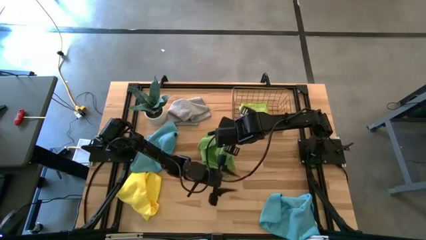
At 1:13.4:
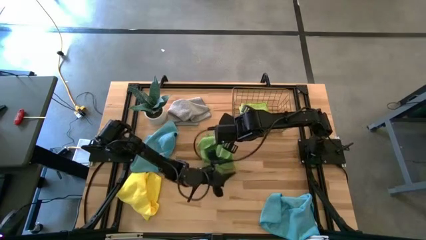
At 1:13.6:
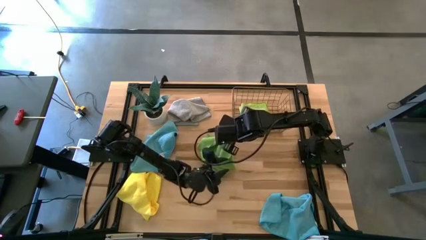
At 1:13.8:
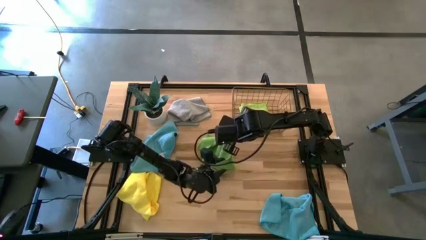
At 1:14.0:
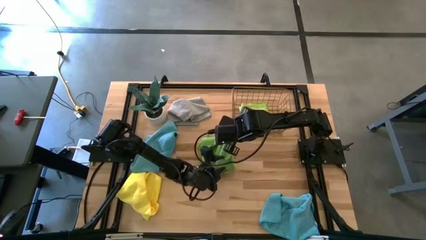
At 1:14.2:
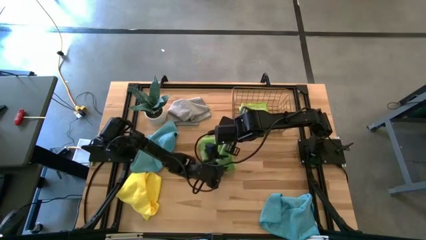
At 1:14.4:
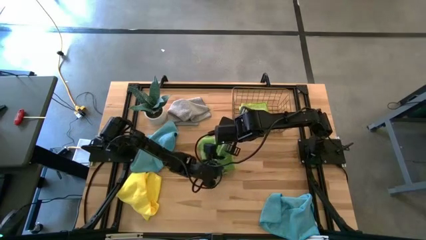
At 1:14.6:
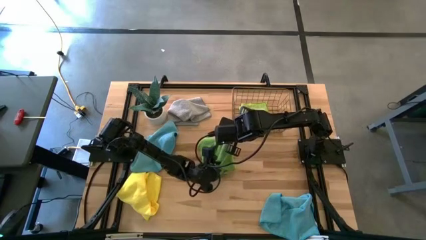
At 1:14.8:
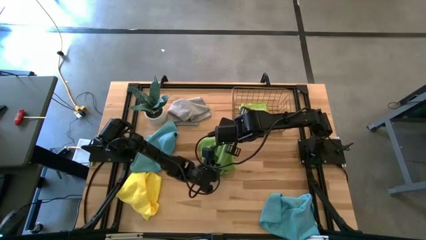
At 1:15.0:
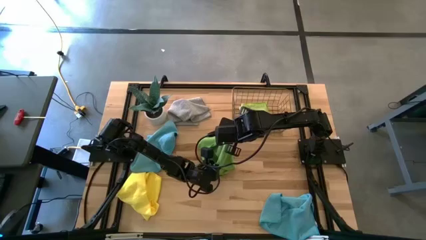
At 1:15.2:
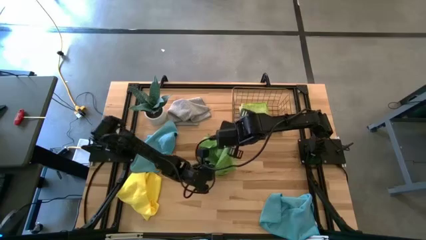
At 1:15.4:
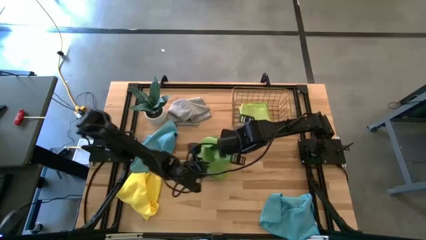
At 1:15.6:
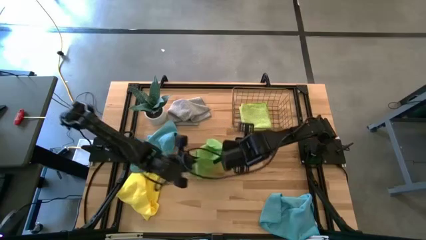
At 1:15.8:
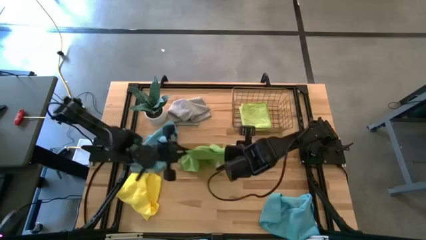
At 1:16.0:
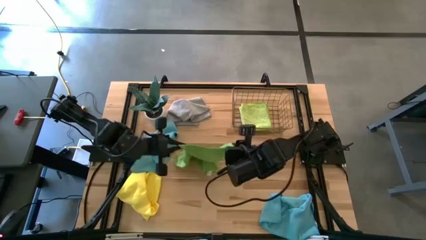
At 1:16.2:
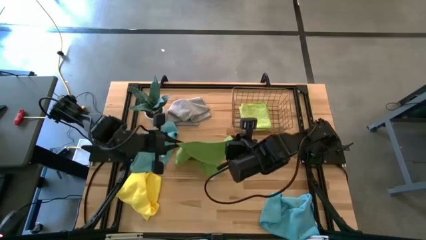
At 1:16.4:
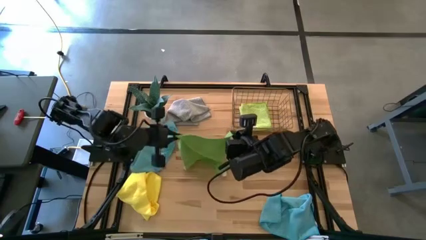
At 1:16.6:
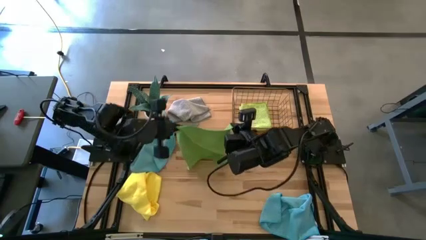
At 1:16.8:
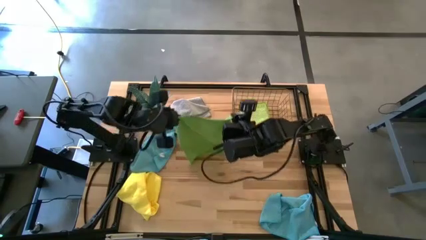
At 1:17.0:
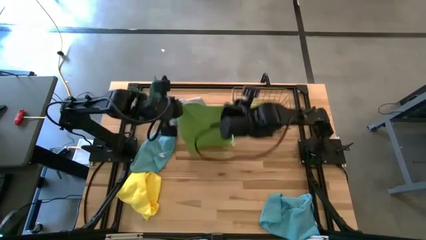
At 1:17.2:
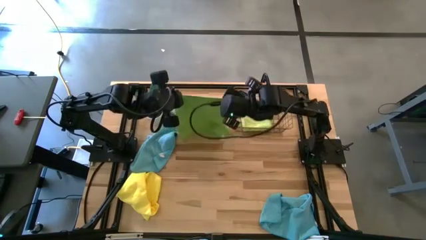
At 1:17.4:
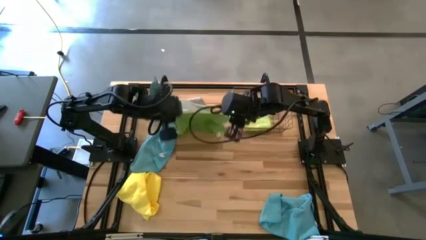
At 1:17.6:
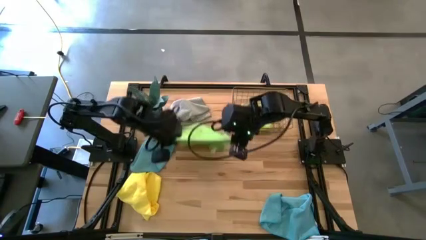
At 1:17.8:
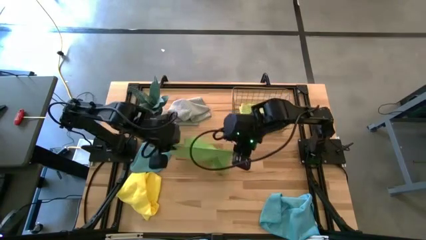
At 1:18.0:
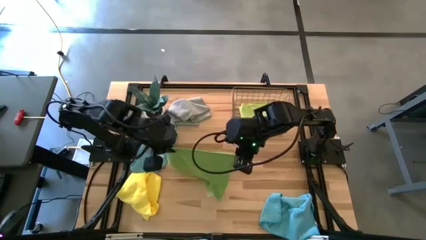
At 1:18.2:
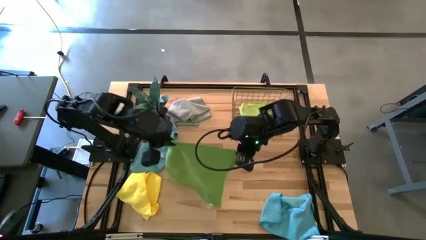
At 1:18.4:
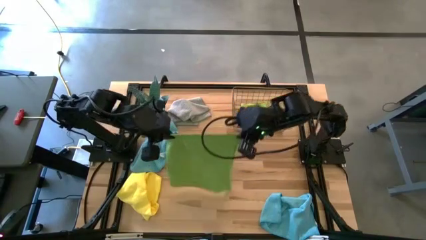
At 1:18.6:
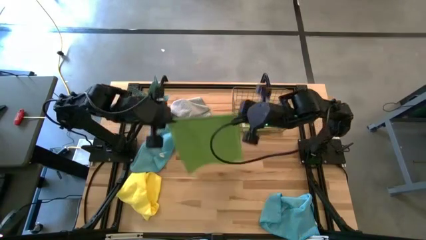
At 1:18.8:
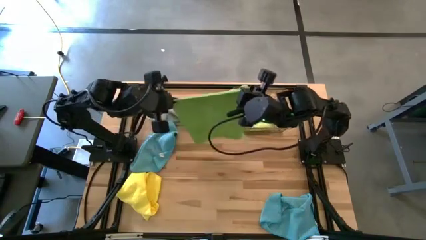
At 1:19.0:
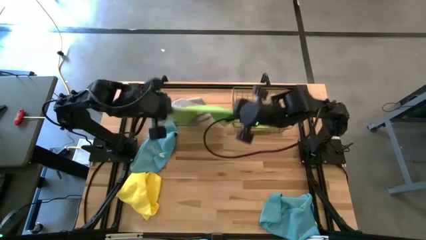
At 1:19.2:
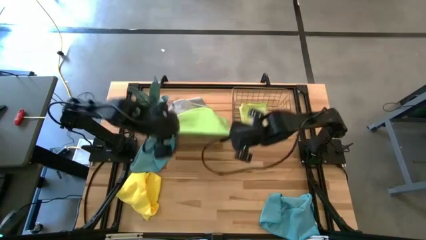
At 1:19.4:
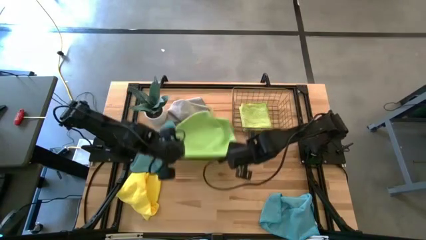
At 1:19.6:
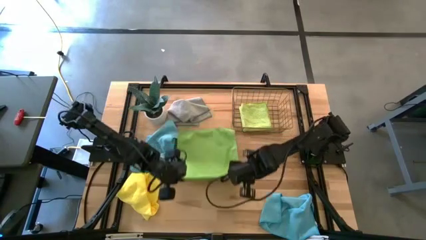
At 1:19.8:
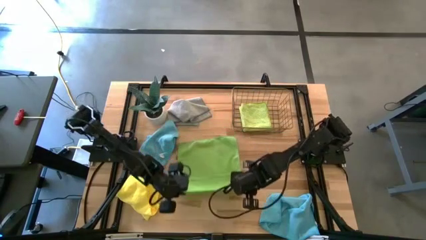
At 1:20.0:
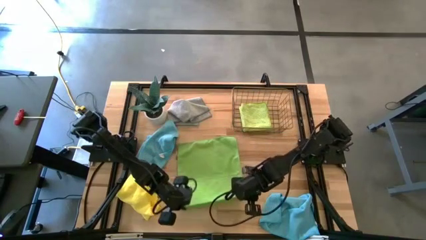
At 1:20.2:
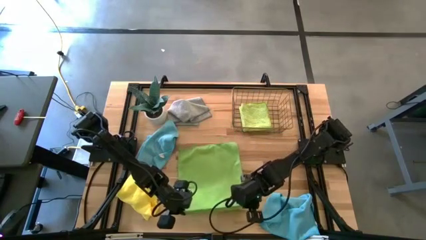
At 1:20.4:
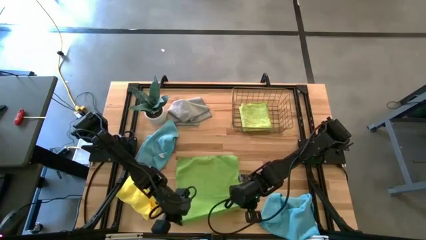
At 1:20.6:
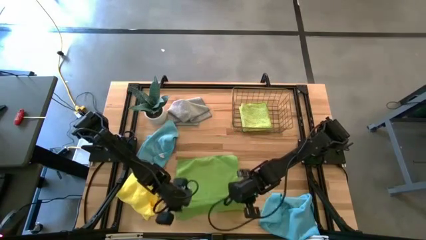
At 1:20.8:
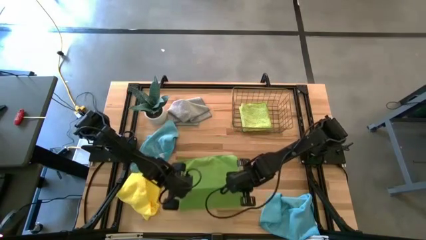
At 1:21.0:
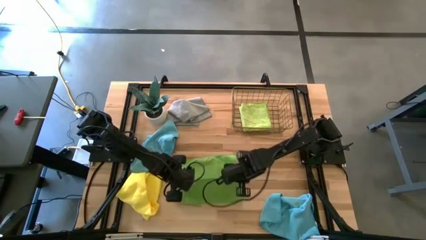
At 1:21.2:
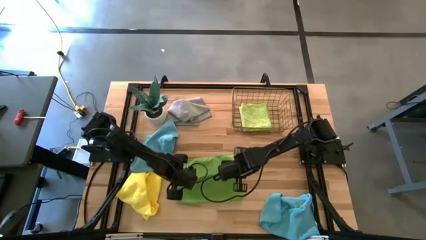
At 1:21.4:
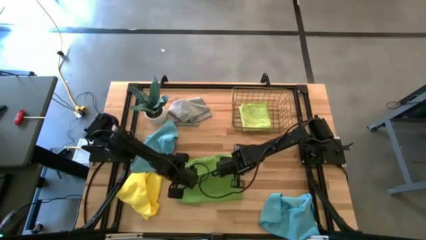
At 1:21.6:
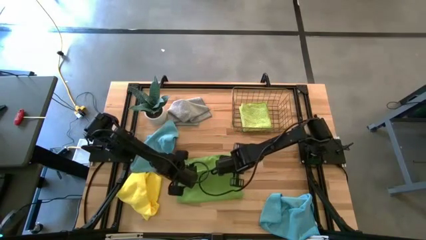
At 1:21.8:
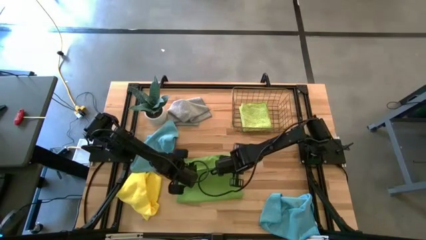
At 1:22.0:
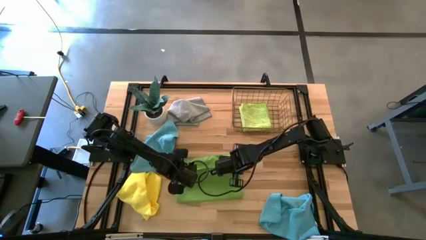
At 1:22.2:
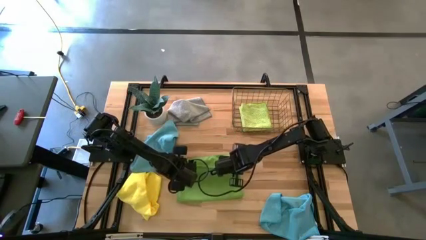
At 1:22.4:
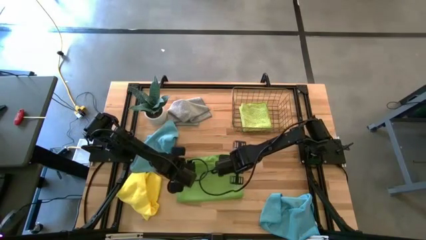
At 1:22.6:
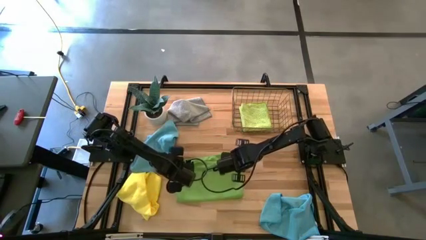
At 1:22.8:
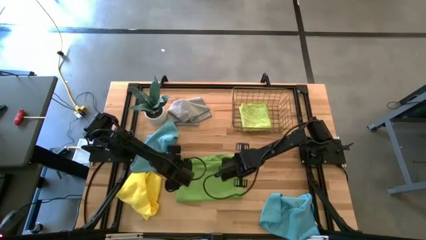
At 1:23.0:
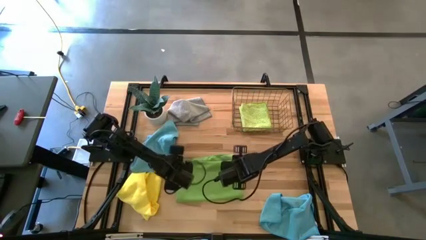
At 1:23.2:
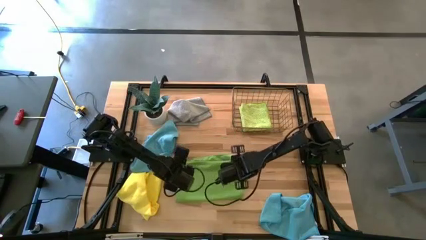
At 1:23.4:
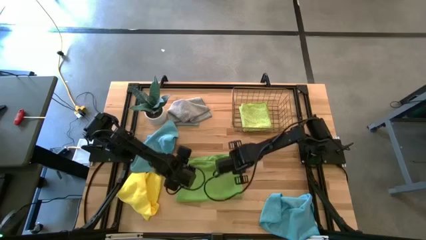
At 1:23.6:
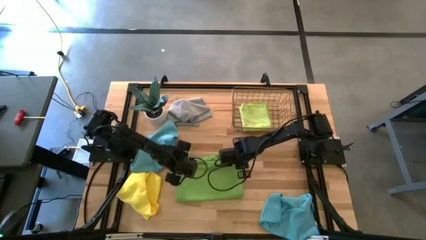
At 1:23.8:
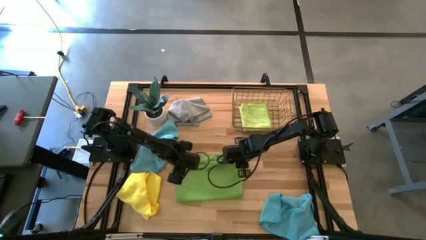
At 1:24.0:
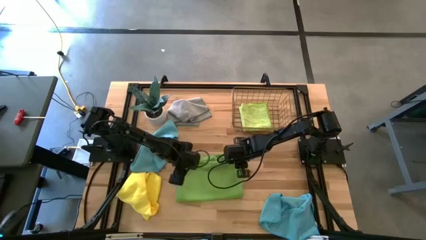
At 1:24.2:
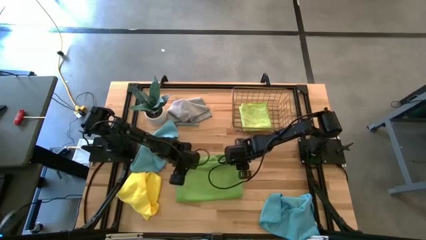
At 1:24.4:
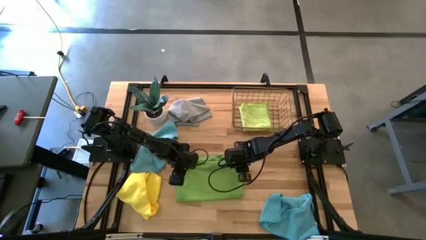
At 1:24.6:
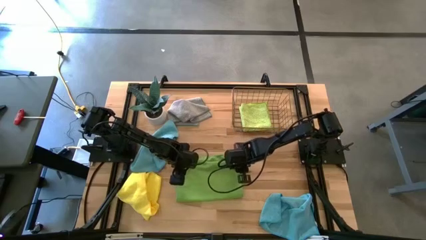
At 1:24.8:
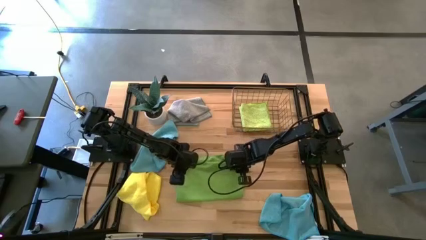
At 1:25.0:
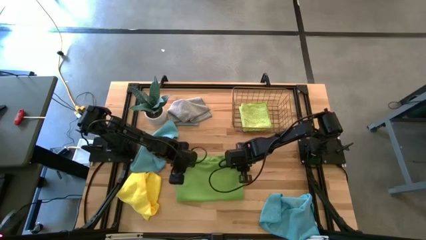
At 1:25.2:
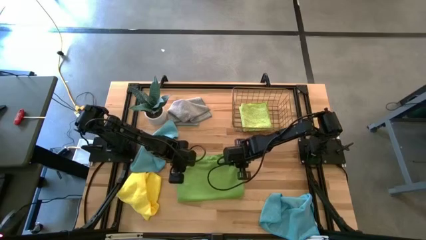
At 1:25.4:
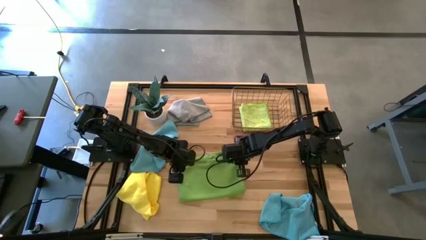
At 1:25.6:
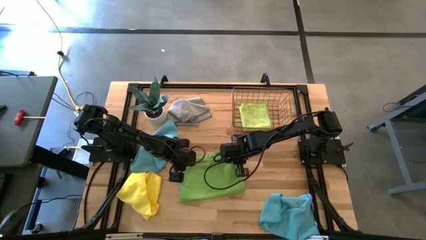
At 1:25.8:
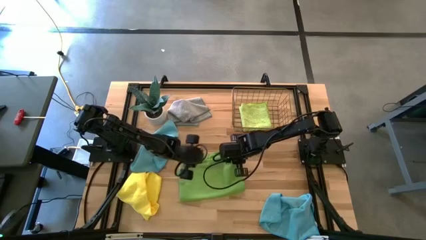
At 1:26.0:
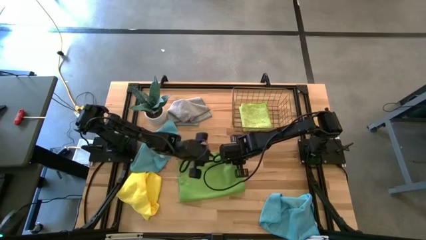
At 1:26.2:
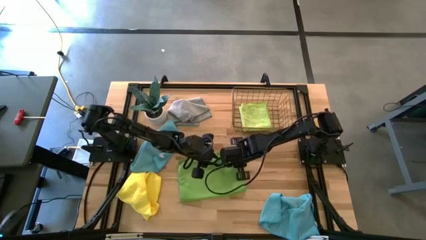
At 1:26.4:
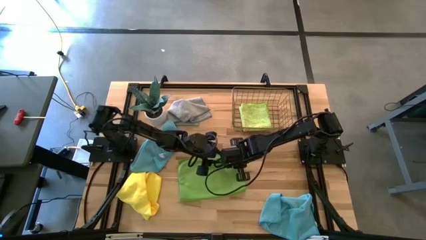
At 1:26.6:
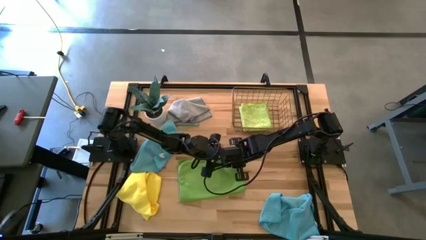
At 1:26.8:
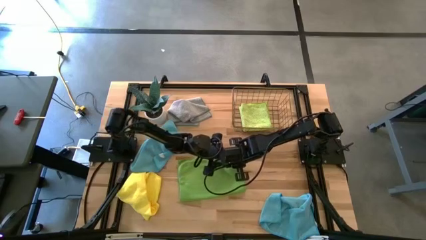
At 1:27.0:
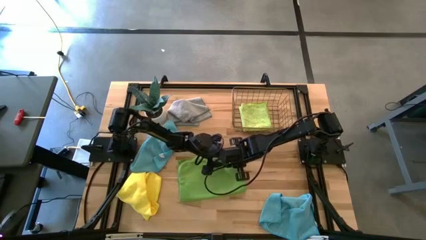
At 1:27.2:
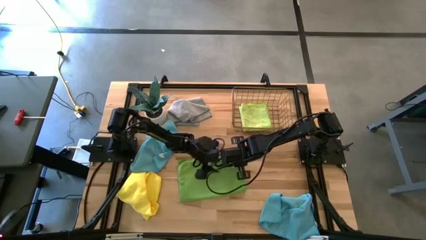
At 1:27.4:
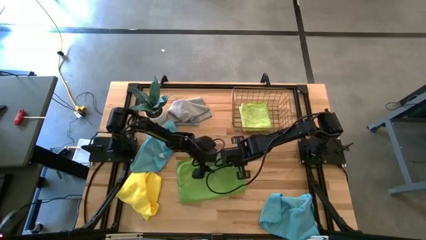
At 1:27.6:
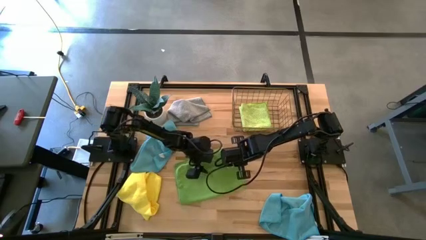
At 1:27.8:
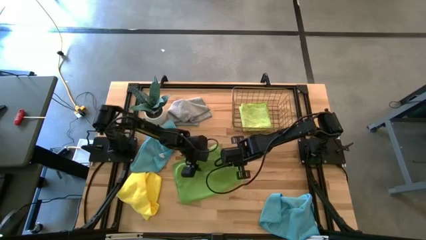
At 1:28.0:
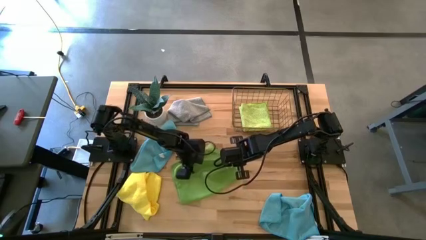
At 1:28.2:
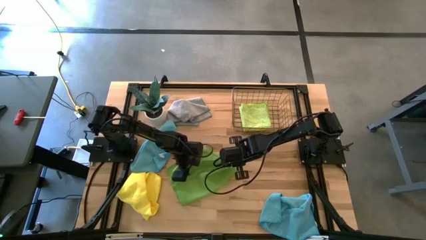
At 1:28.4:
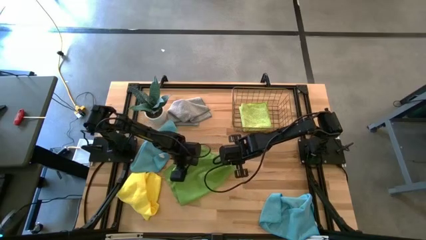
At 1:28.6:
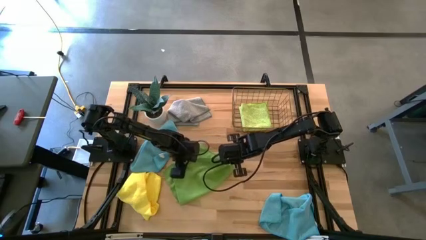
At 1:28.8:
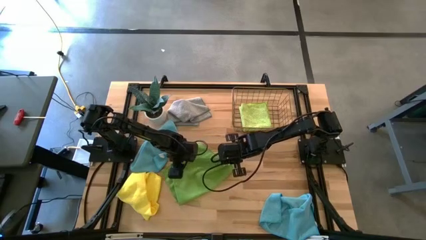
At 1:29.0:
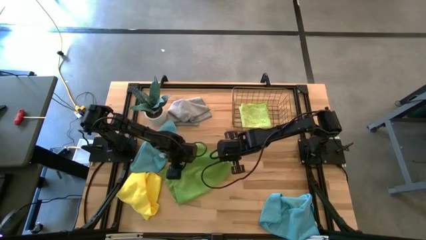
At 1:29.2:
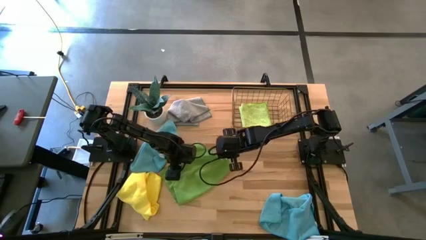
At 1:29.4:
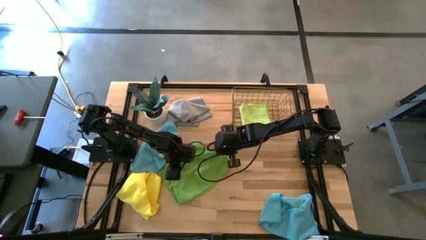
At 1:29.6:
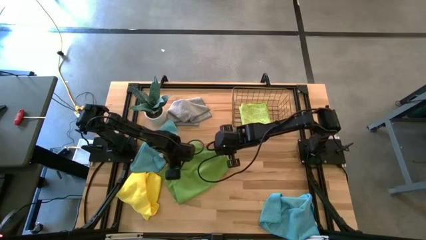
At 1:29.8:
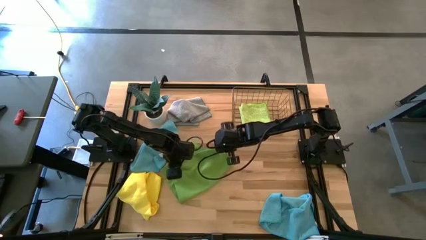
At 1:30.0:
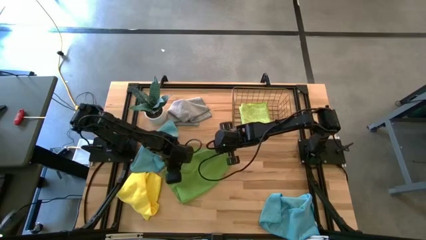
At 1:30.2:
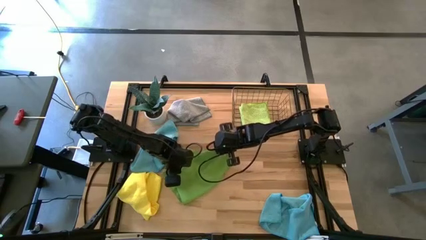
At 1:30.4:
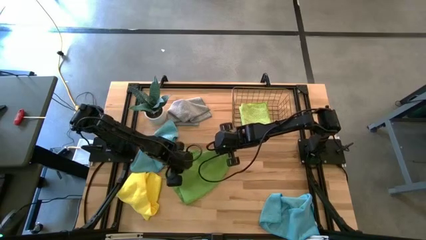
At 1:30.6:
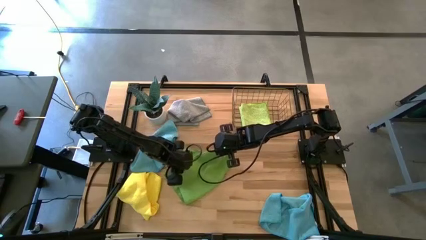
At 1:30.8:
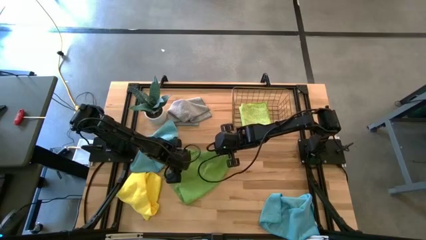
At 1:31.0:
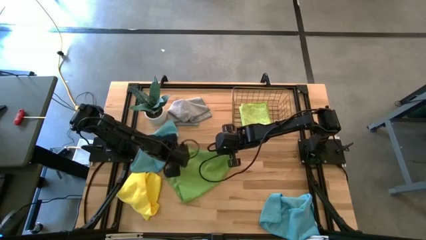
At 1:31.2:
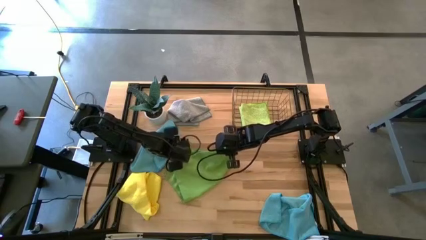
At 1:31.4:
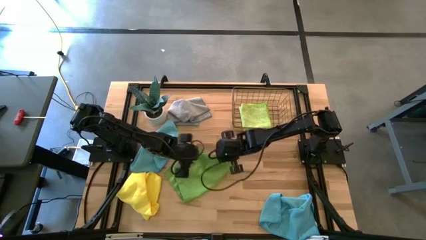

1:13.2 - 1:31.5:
Task: Fold microfiber towels
Fold the green microfiber towel
